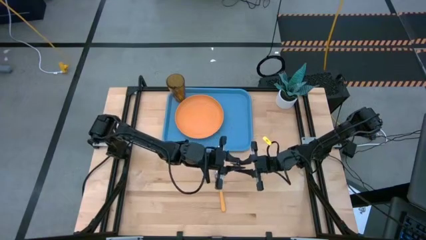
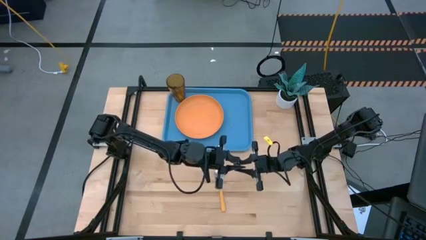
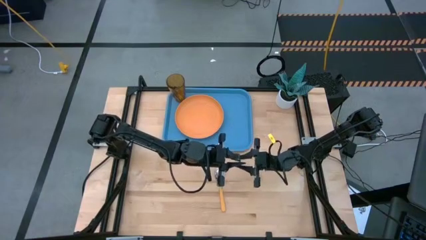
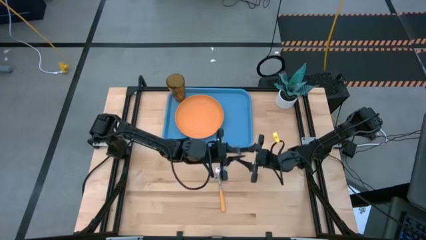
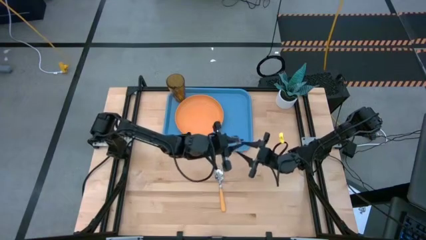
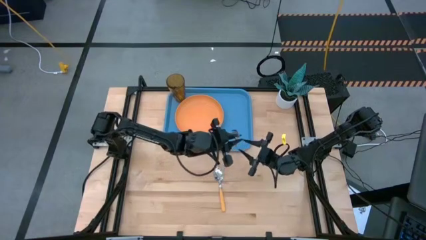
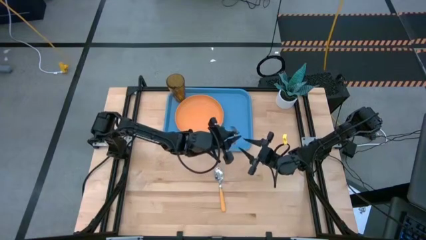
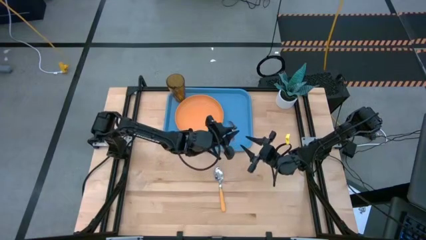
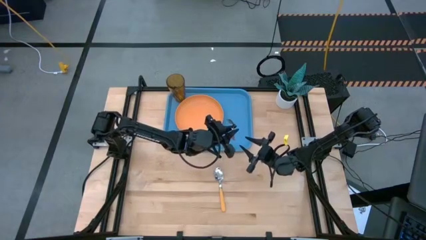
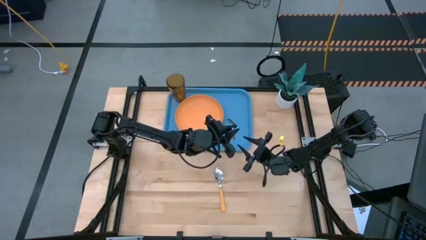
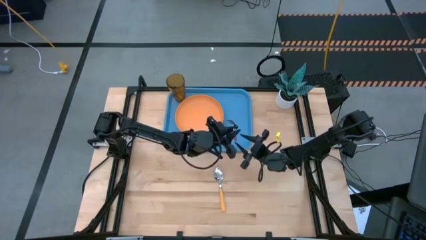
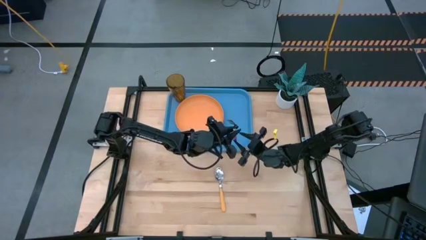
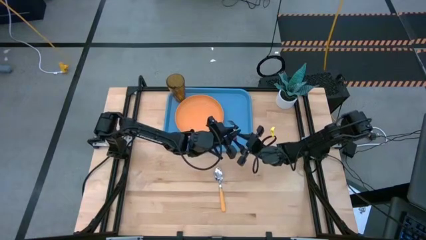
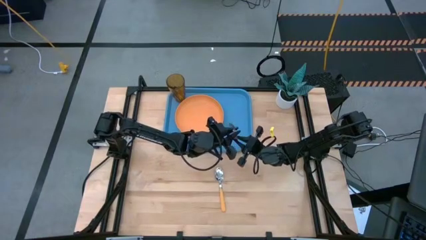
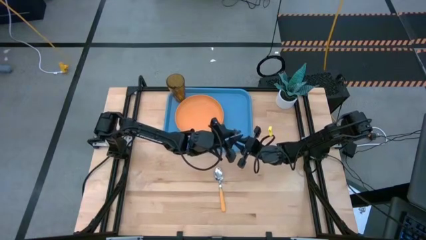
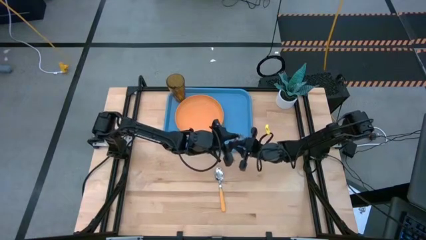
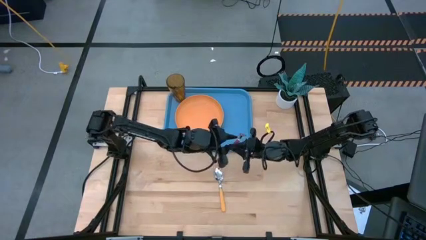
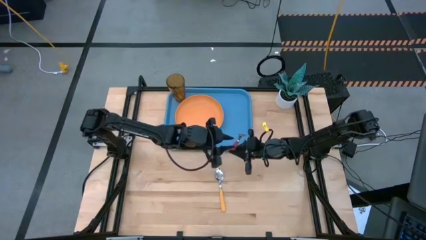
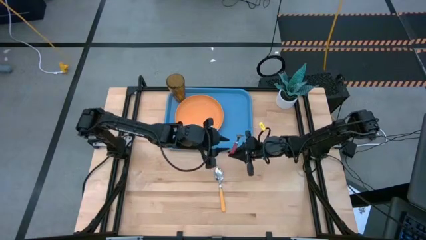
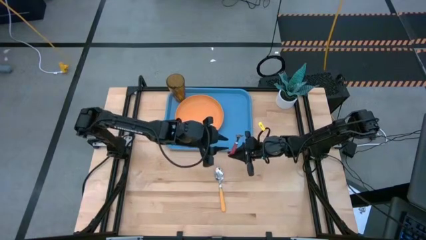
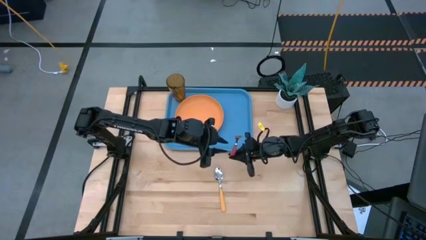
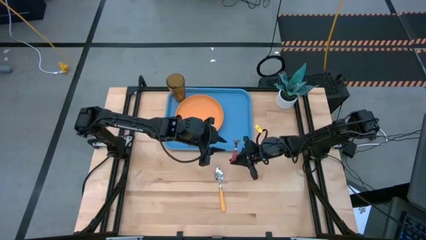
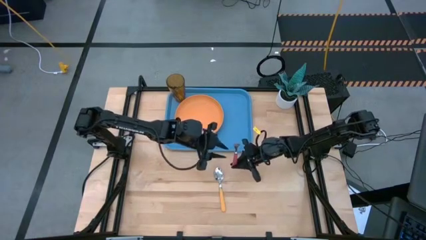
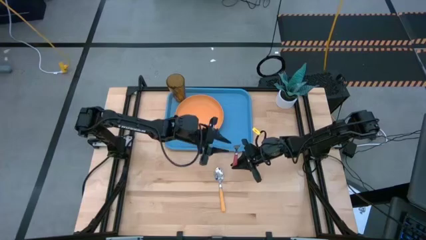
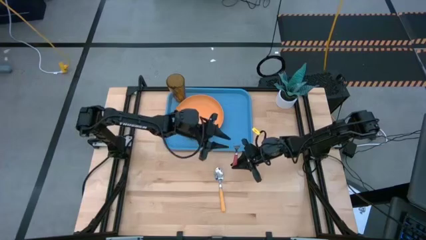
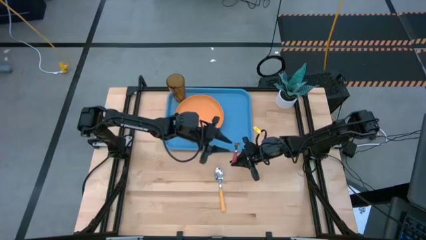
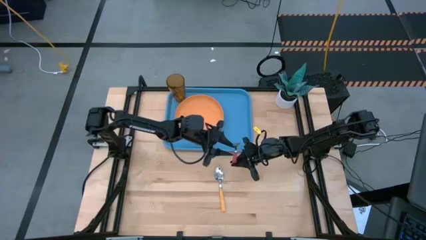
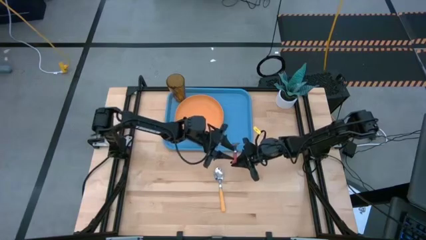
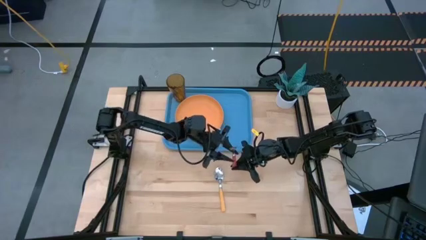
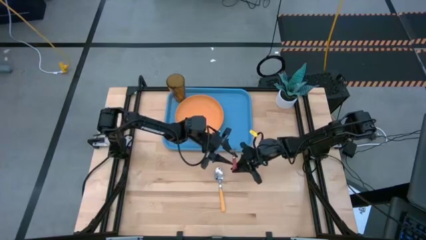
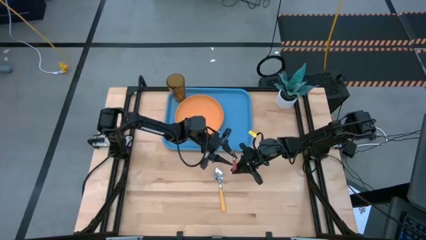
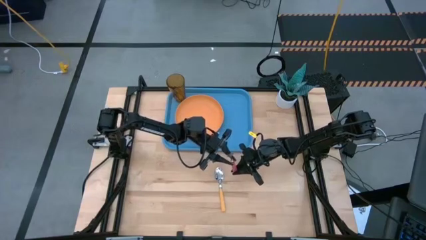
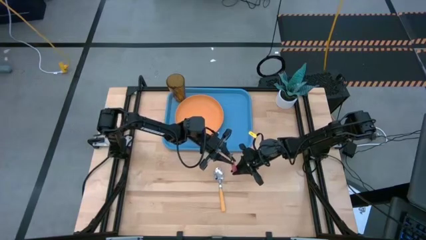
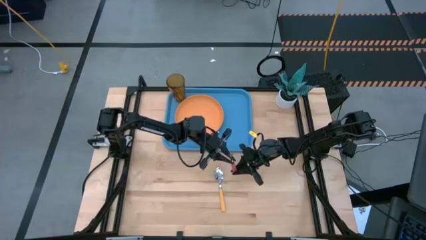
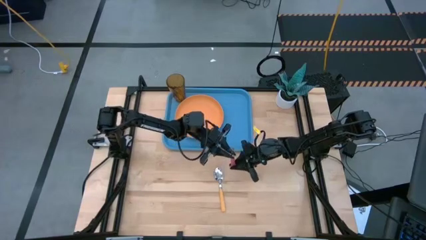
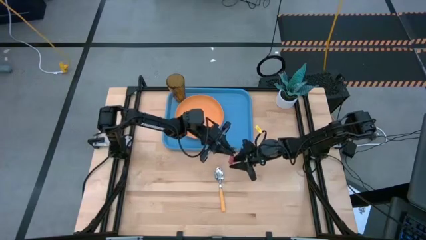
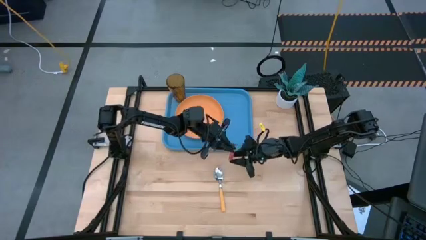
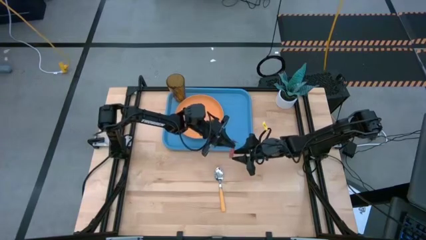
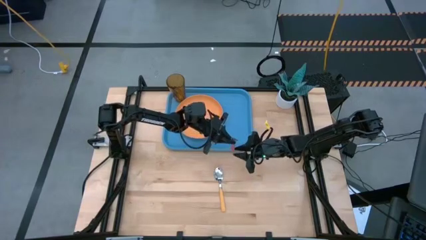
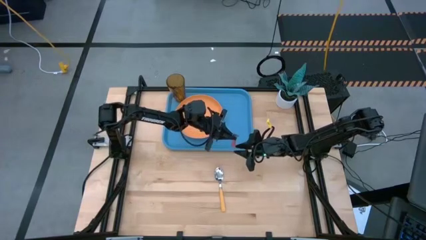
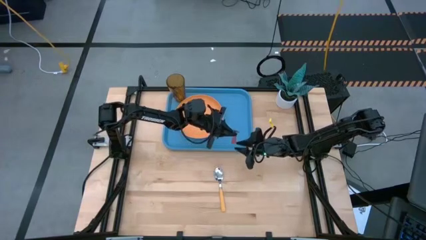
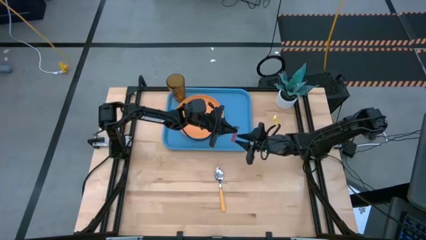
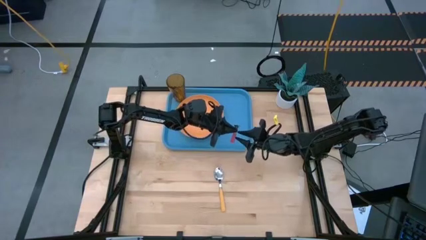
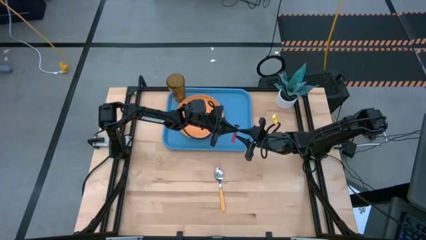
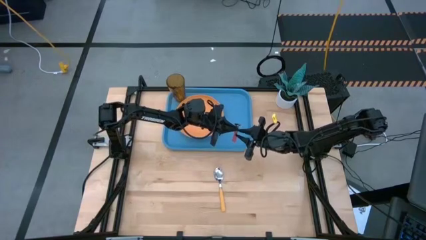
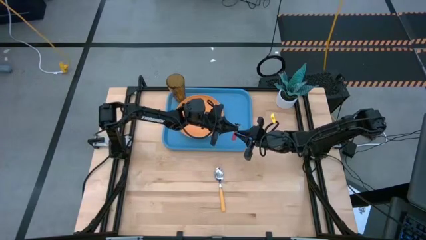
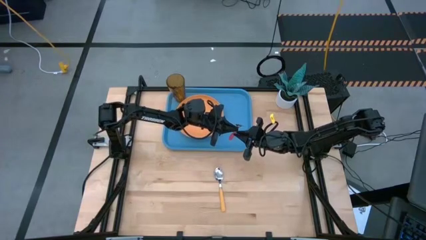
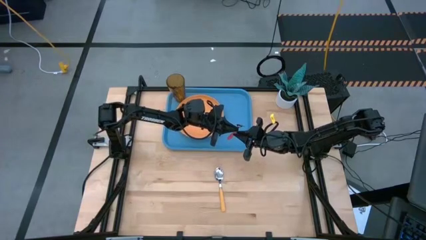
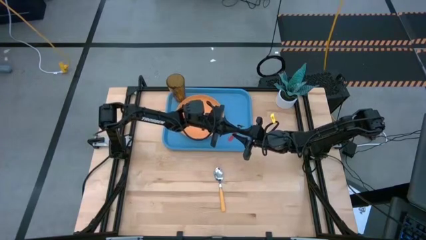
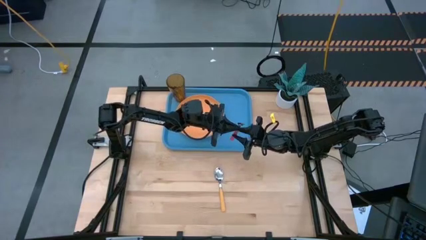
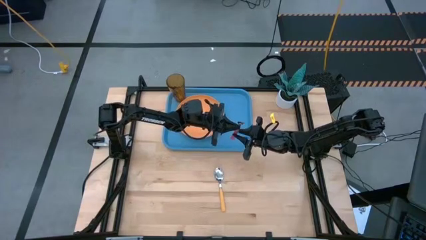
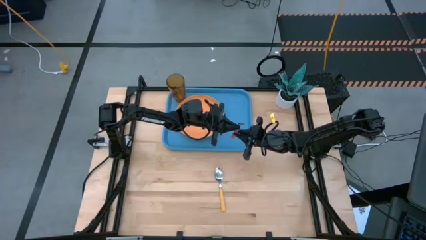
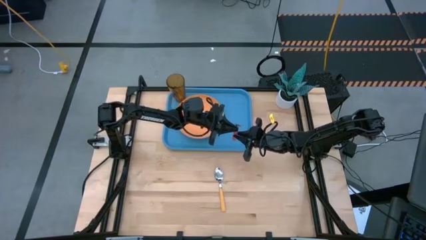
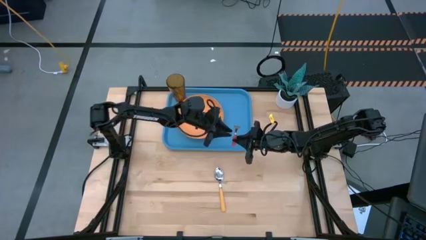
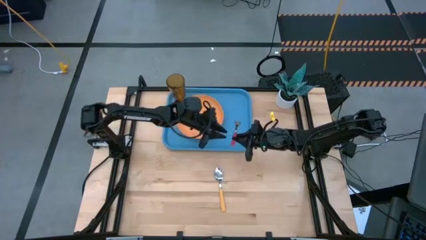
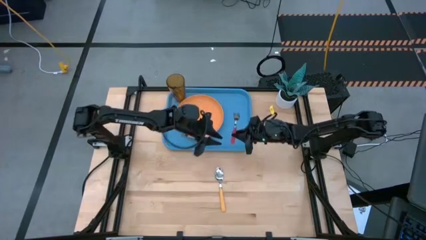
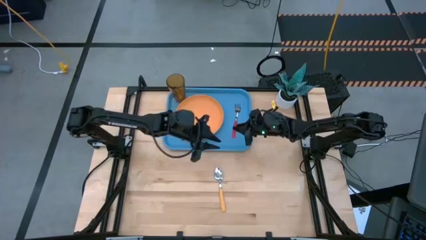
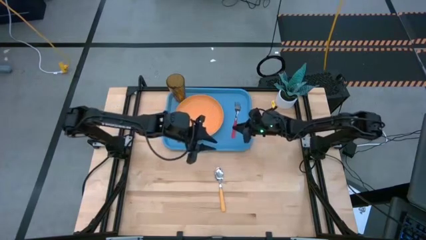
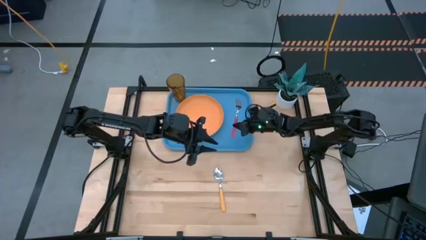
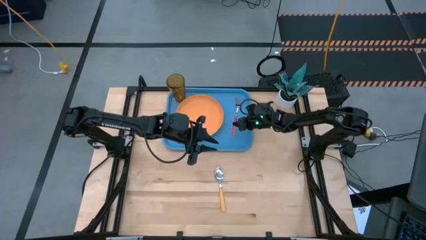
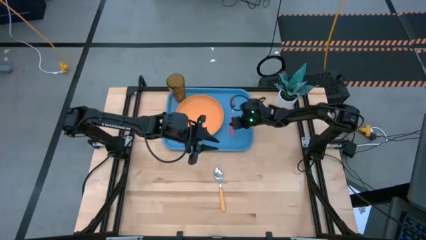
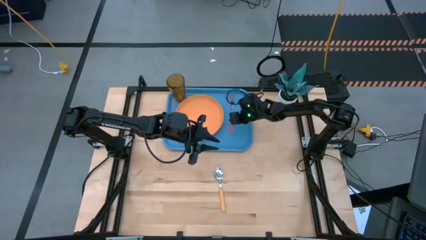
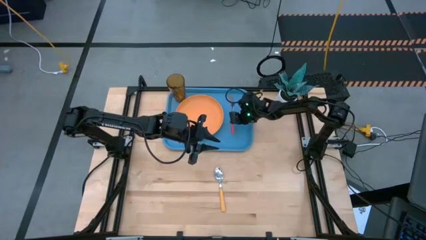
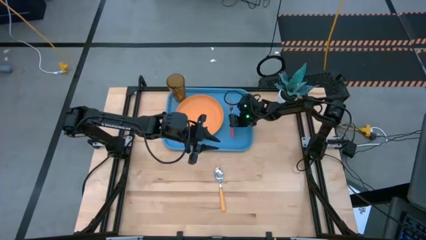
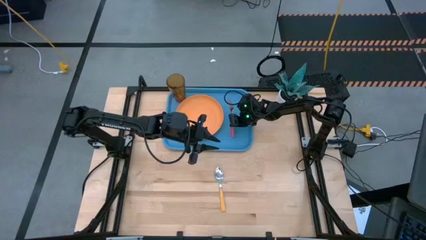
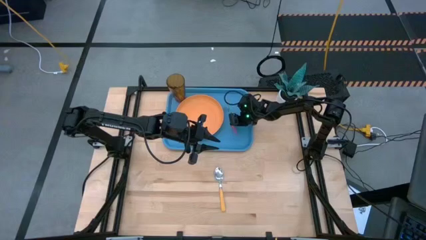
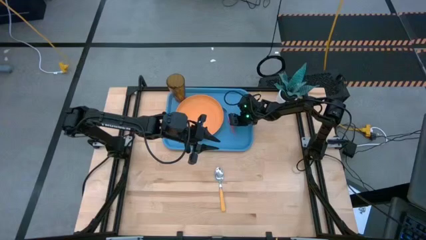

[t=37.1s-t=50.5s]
Task: Pick and place plate/cup/fork/spoon on tray
Put the pink fork on the right side of the orange plate
